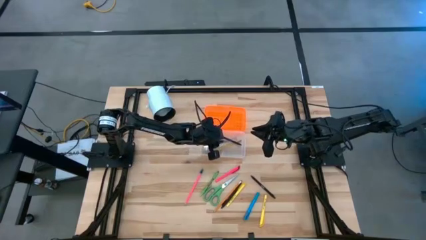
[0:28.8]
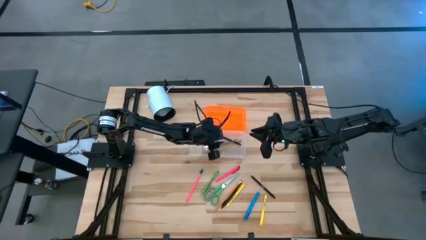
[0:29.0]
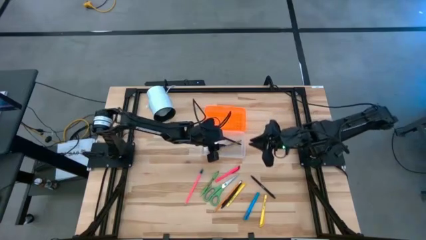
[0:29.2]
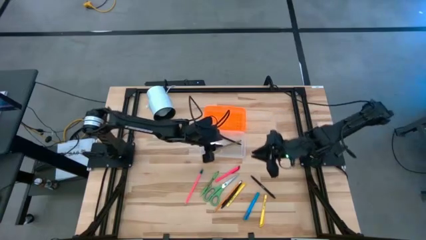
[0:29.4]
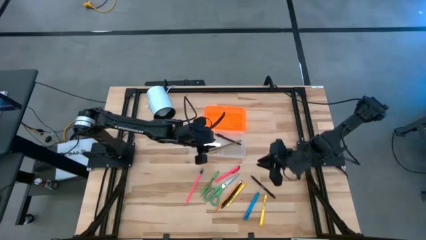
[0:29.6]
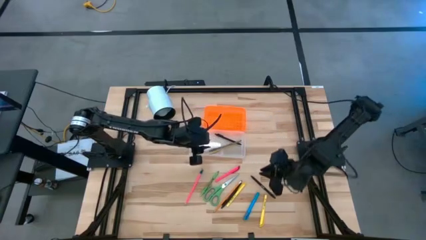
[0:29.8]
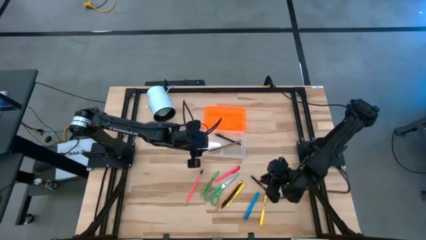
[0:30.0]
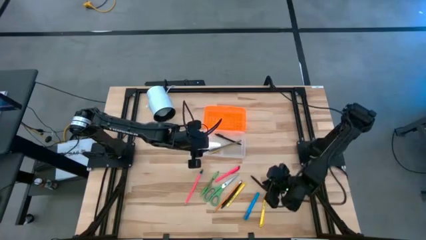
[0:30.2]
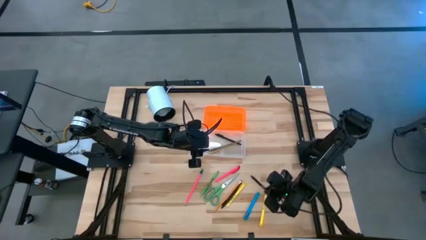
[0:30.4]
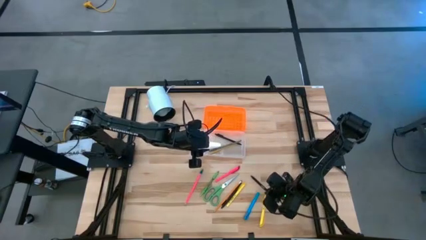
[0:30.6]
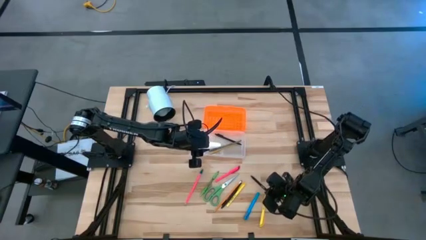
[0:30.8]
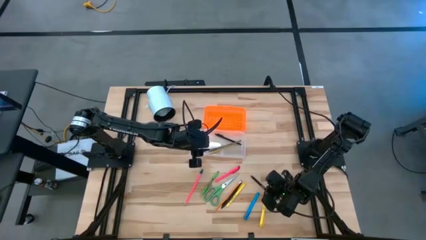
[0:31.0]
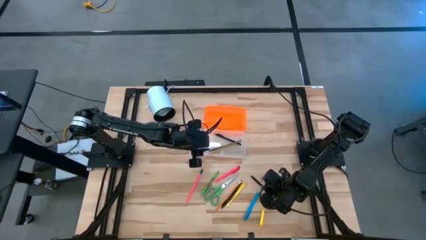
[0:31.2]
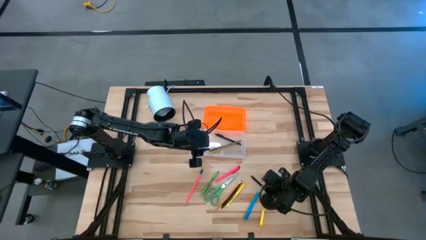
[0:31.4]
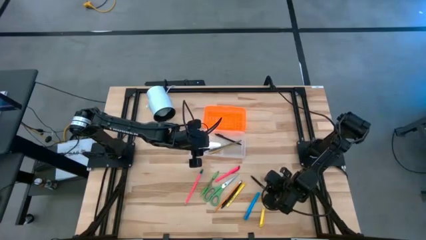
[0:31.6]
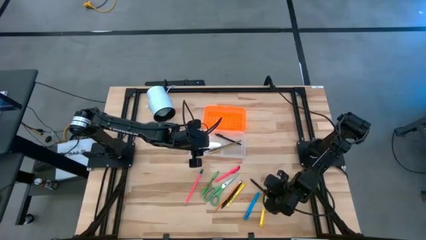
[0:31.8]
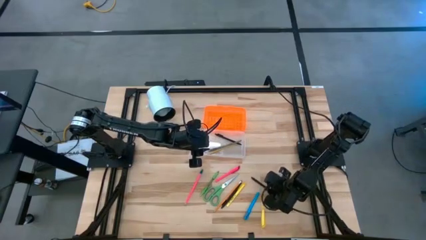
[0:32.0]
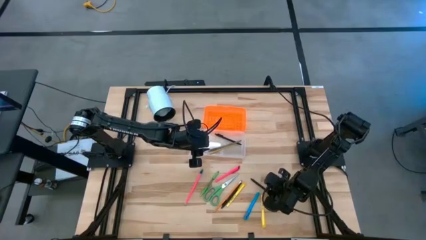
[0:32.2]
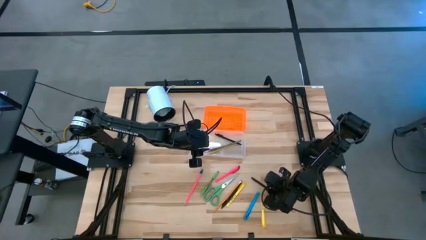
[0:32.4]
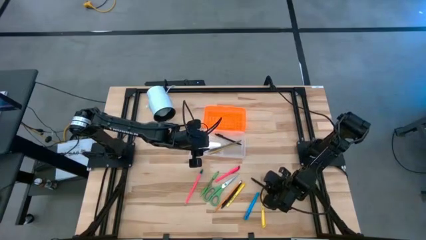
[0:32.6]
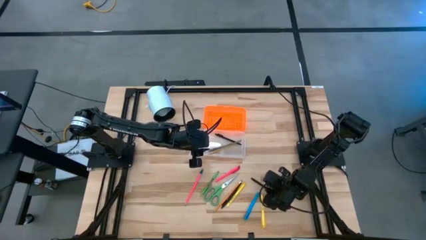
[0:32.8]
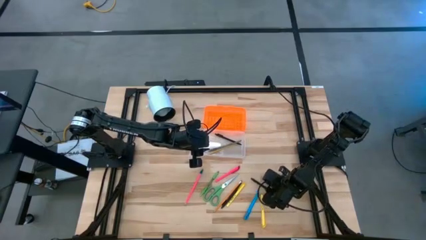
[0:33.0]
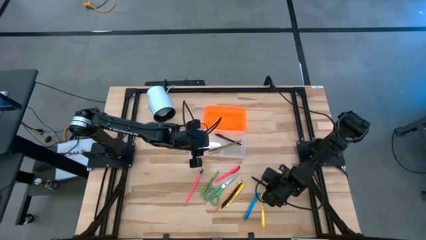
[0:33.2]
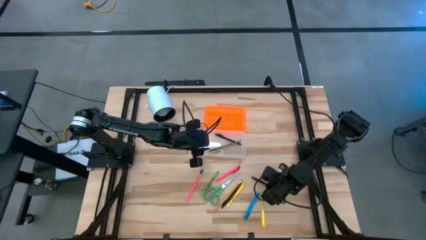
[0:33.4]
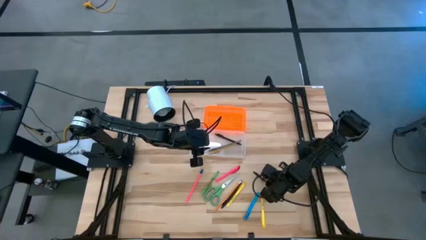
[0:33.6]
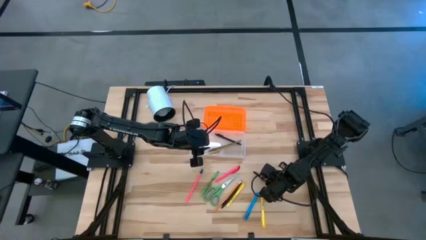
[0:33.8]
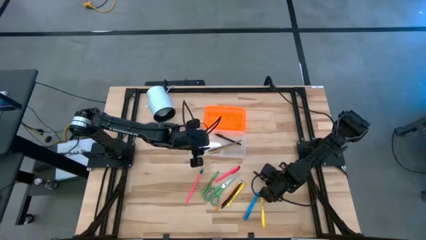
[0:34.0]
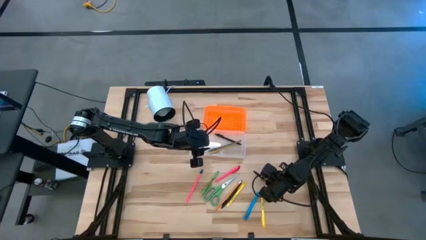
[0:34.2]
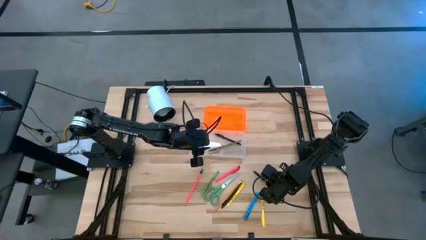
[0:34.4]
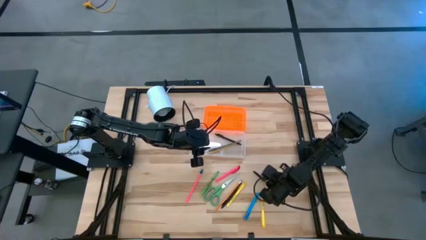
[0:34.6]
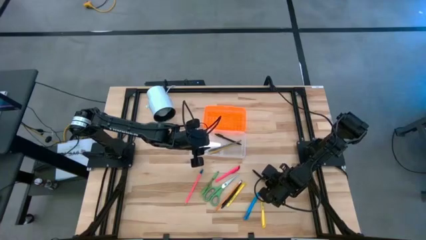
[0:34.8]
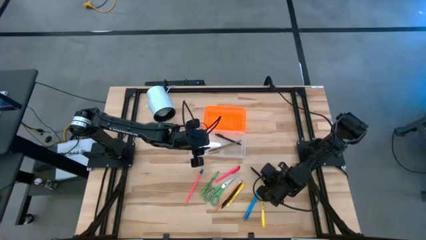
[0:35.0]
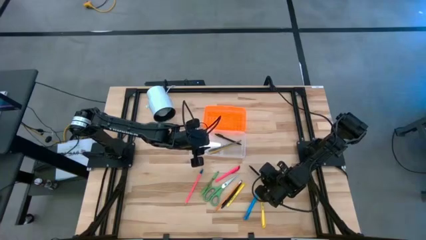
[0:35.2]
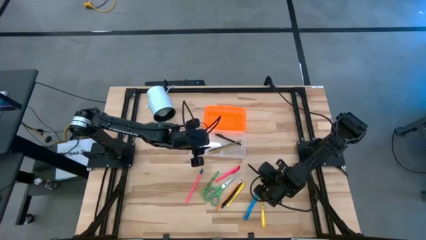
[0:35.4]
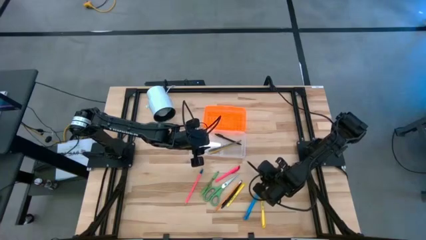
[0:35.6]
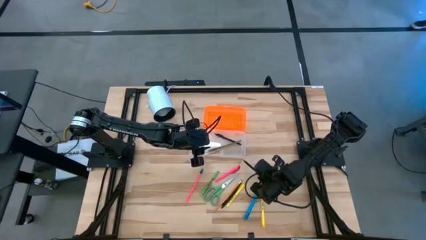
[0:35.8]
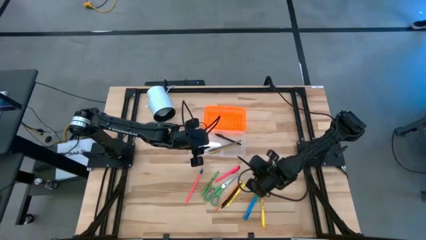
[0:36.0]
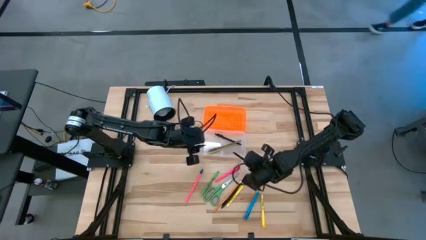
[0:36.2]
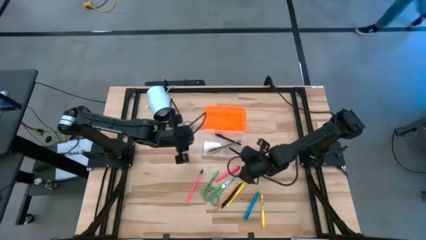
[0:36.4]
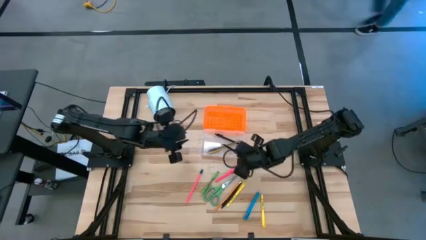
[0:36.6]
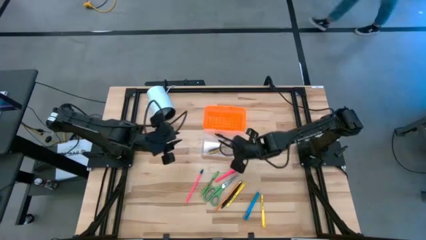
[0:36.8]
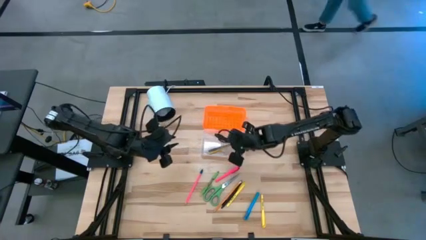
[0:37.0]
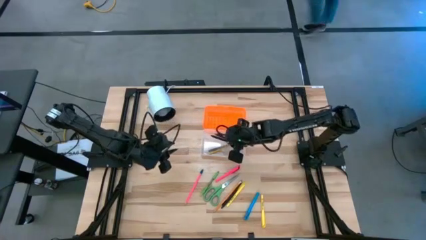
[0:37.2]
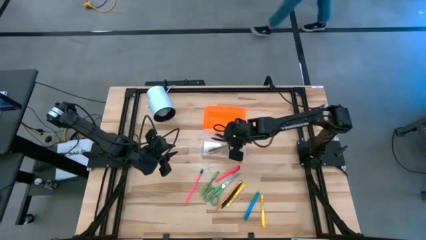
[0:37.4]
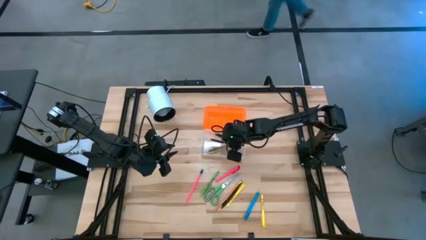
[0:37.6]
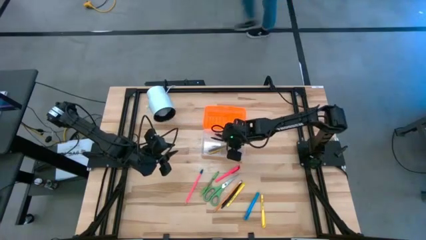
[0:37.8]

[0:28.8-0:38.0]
Task: Pick & place school supplies into a supply box
Put the right black pen into the orange supply box

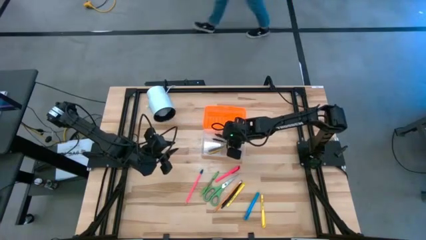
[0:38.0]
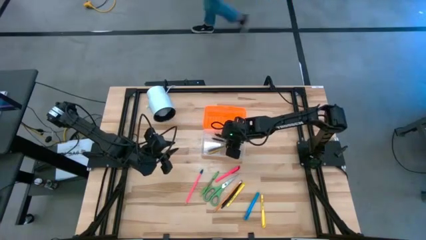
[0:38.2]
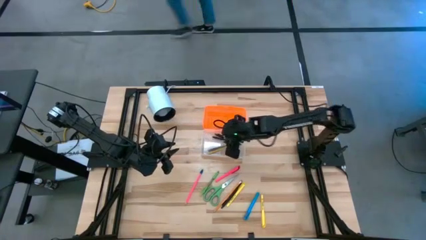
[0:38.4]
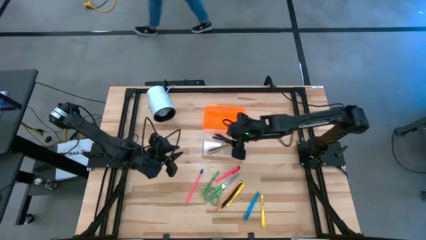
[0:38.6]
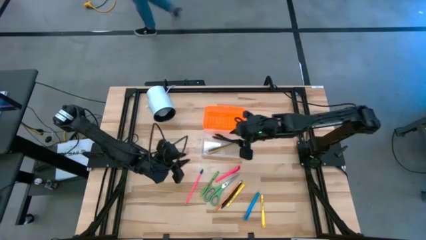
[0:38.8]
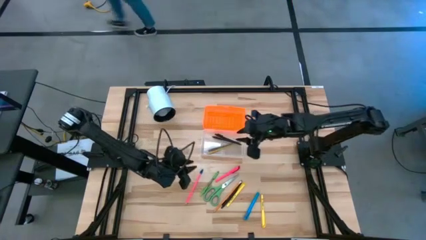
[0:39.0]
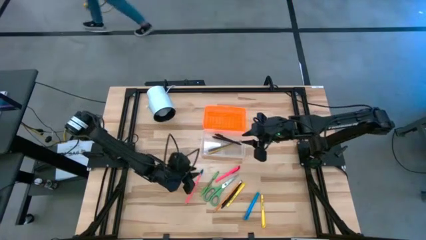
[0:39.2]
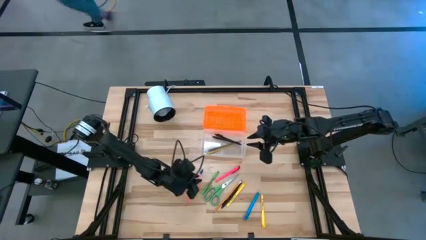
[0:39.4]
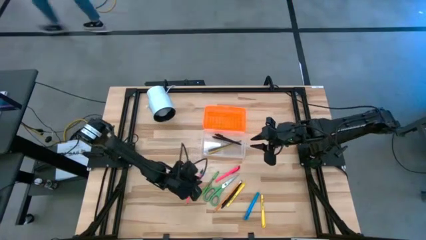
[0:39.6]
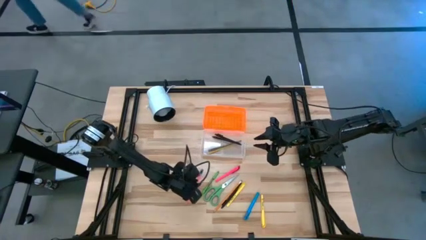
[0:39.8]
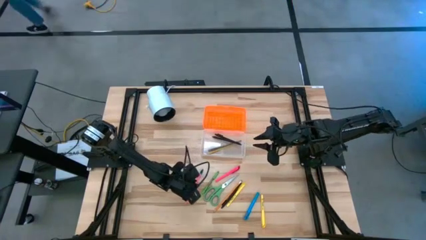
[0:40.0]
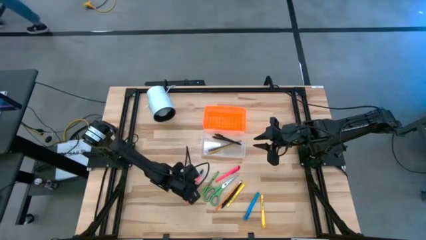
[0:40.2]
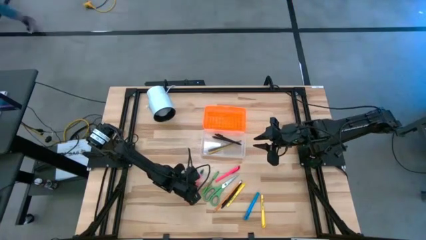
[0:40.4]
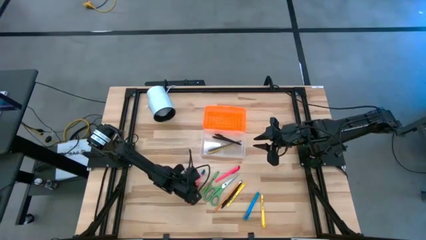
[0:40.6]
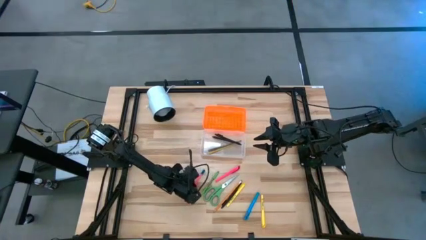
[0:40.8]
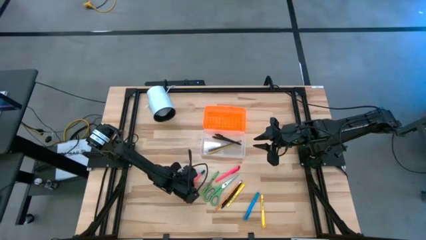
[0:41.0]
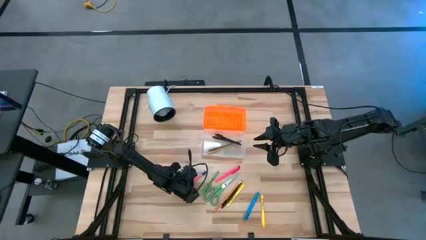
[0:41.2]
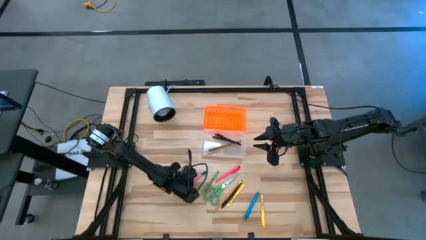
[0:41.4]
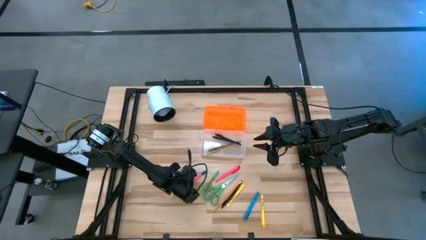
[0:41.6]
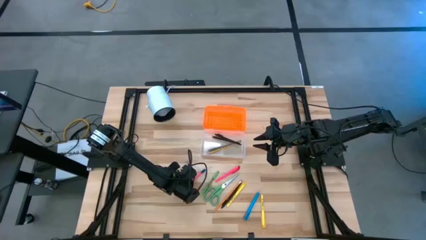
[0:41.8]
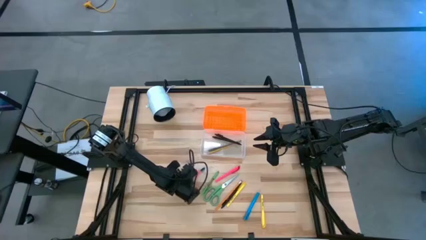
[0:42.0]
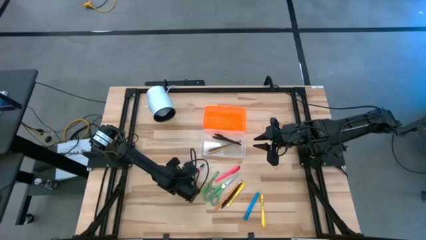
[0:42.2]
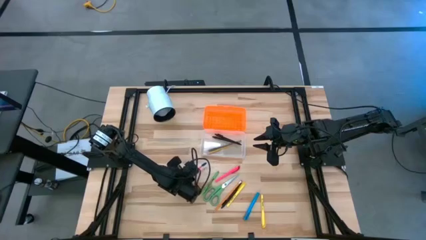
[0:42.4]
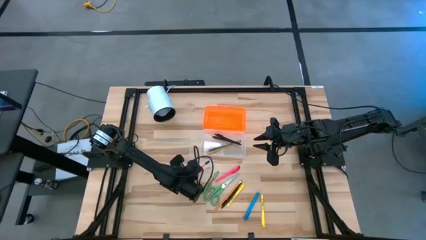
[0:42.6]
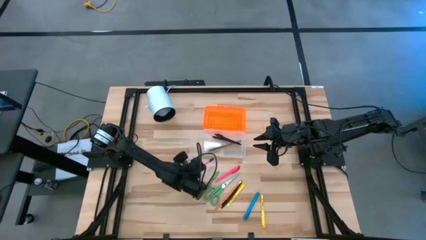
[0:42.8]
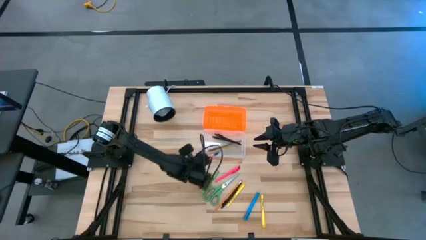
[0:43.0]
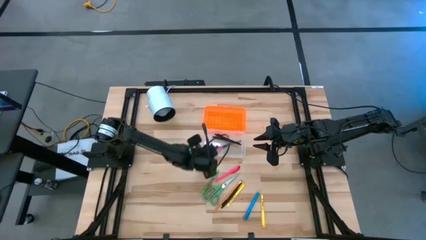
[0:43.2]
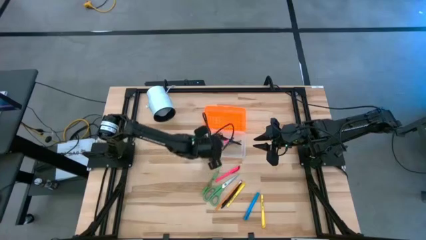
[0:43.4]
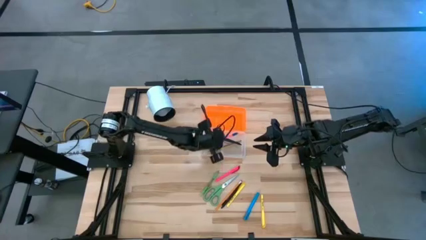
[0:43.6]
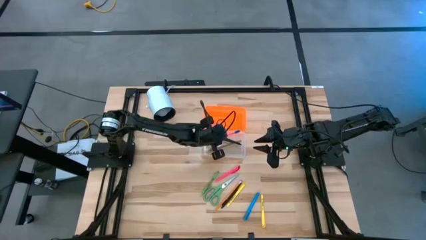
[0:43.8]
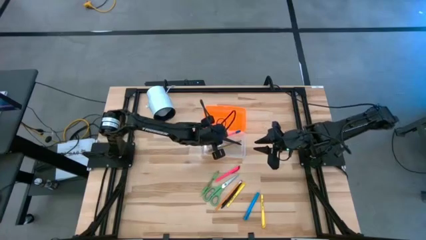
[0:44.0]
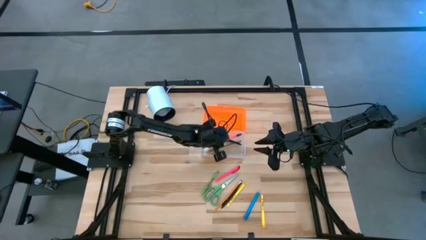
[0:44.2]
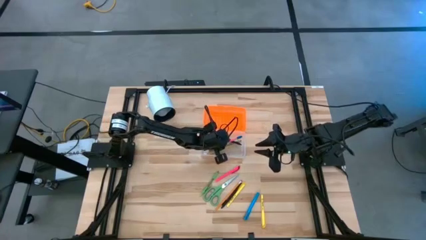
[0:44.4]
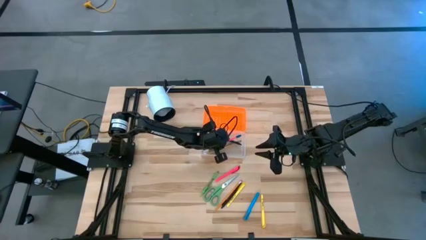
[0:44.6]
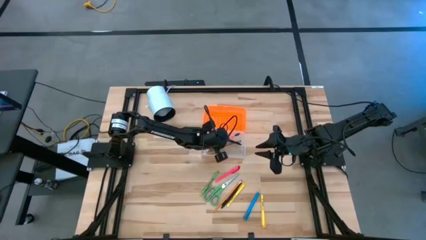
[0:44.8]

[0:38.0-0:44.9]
Put the pink pencil into the orange supply box
